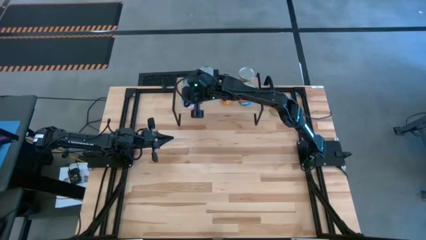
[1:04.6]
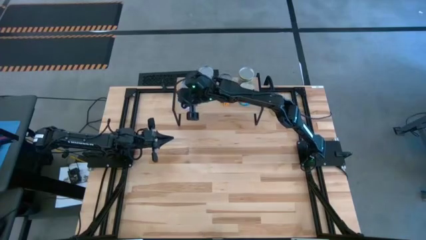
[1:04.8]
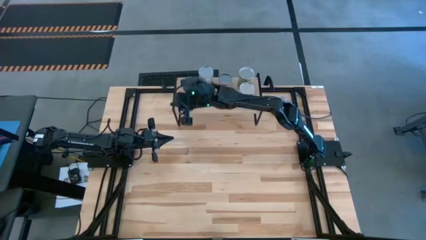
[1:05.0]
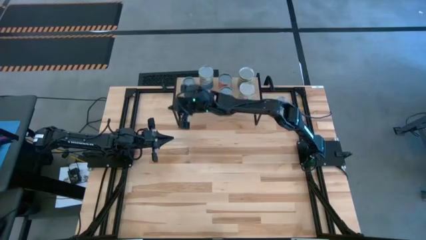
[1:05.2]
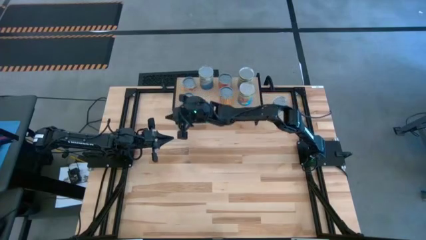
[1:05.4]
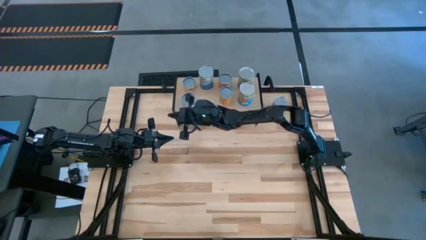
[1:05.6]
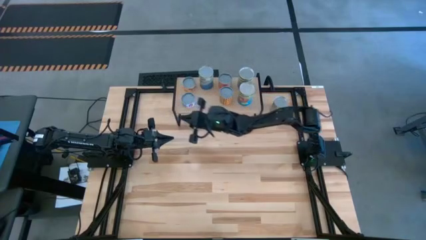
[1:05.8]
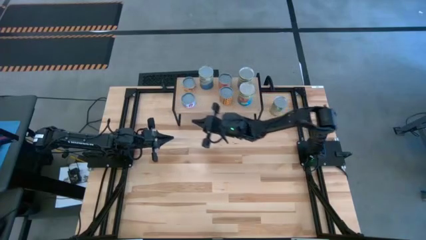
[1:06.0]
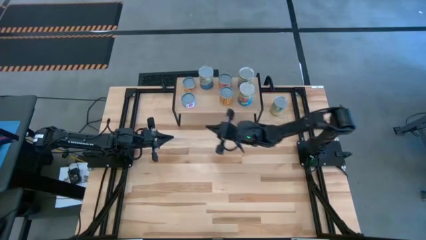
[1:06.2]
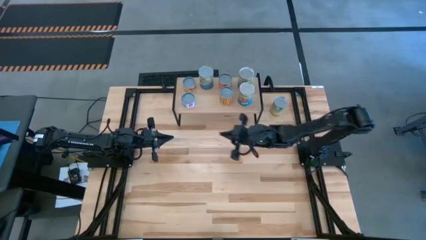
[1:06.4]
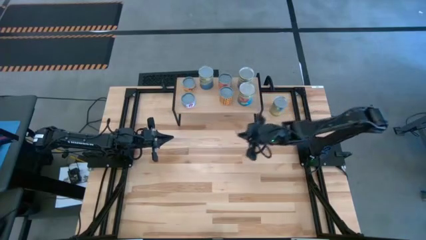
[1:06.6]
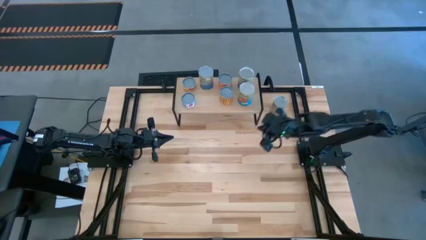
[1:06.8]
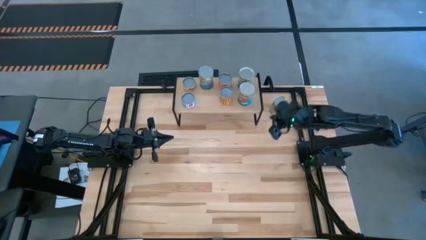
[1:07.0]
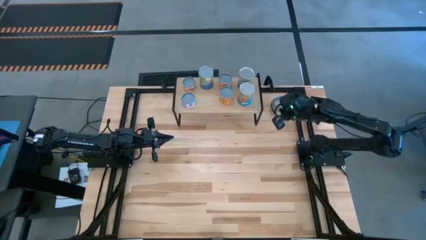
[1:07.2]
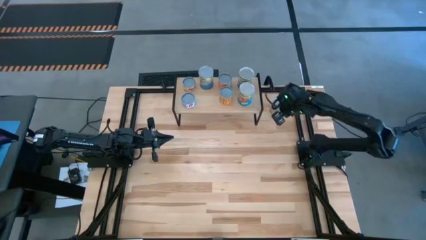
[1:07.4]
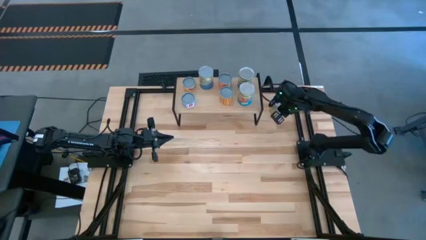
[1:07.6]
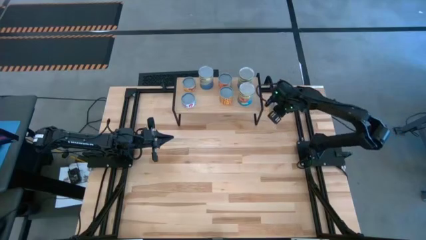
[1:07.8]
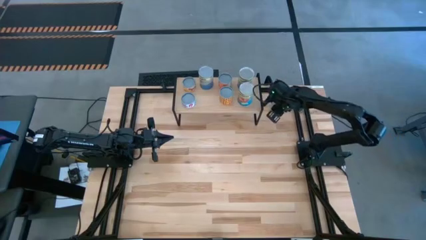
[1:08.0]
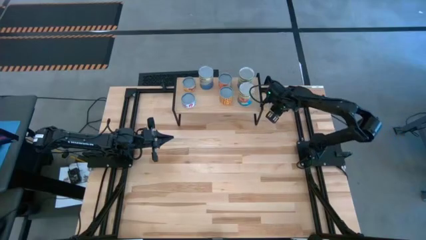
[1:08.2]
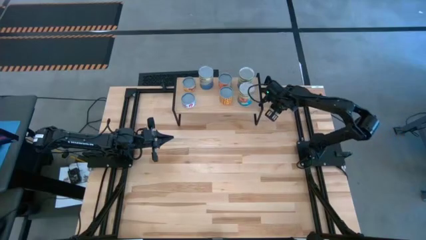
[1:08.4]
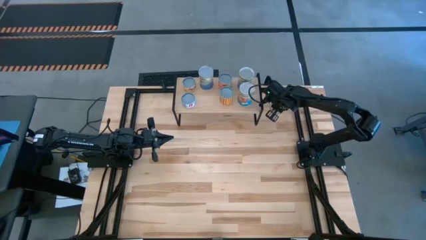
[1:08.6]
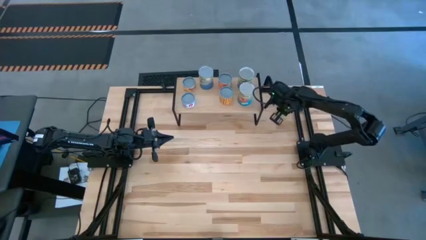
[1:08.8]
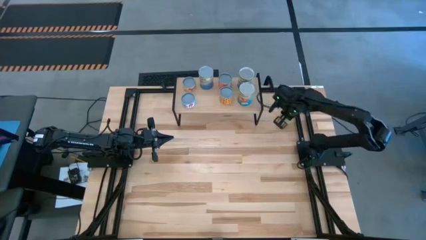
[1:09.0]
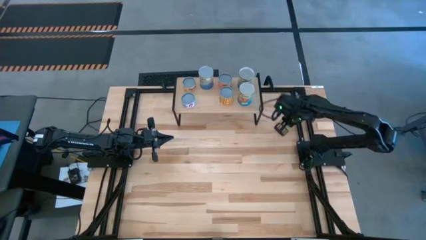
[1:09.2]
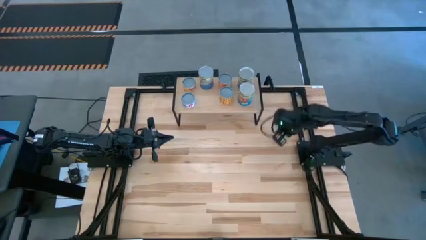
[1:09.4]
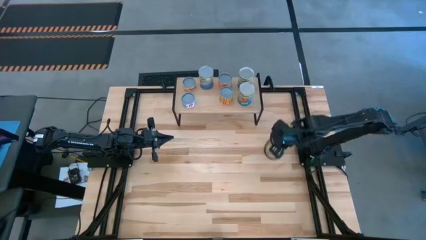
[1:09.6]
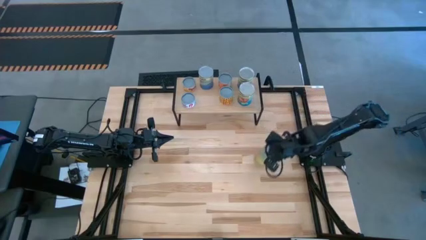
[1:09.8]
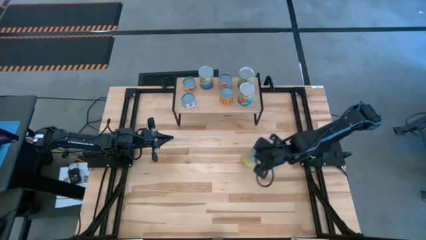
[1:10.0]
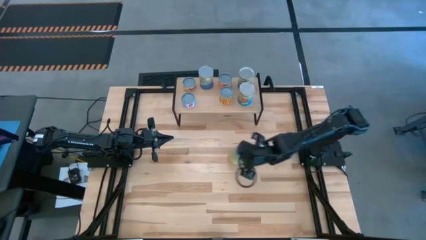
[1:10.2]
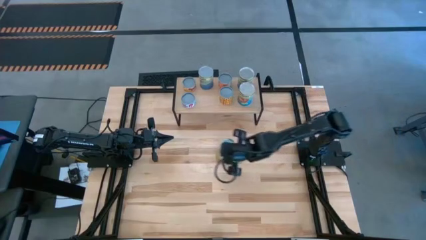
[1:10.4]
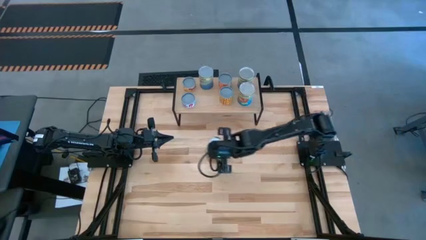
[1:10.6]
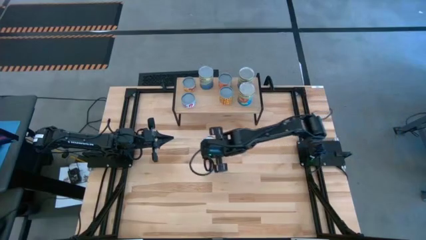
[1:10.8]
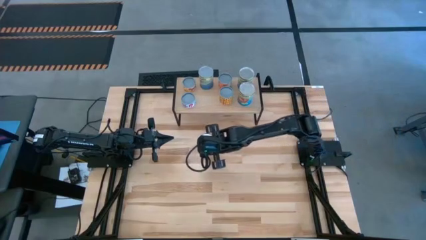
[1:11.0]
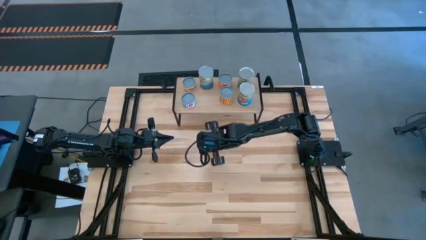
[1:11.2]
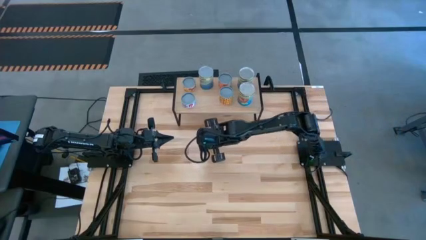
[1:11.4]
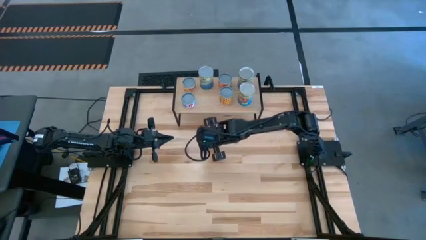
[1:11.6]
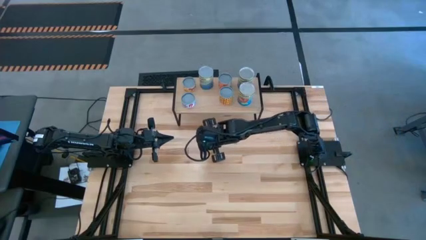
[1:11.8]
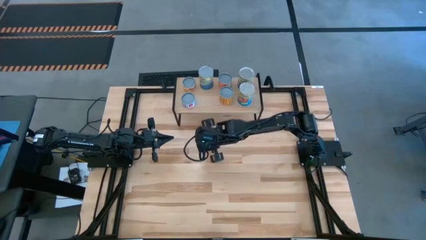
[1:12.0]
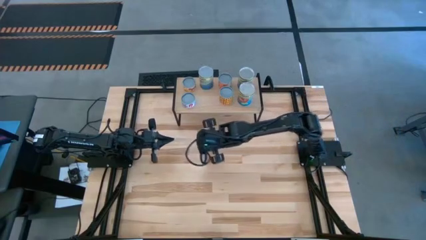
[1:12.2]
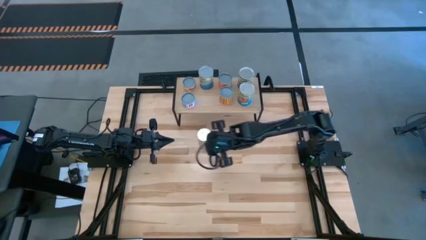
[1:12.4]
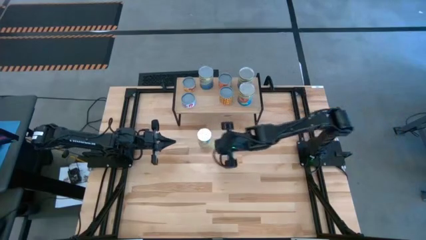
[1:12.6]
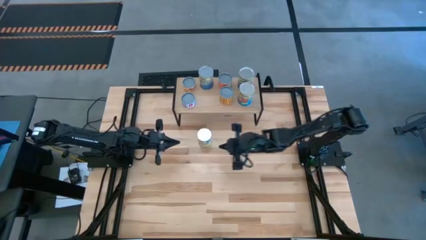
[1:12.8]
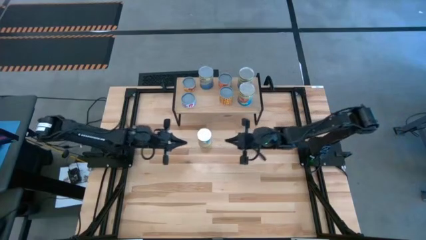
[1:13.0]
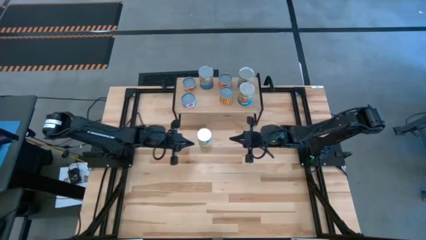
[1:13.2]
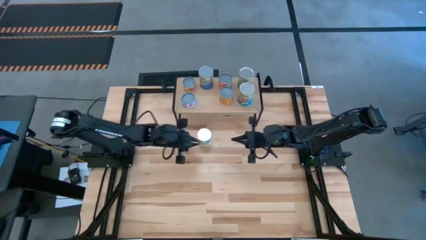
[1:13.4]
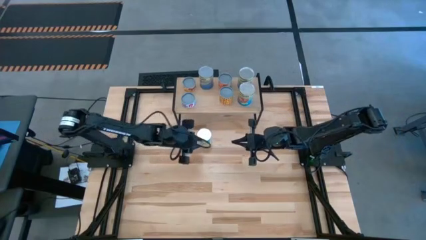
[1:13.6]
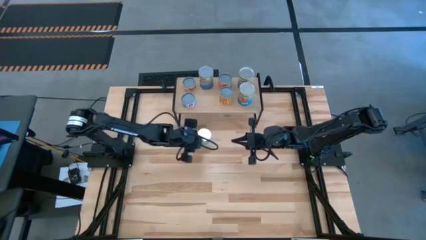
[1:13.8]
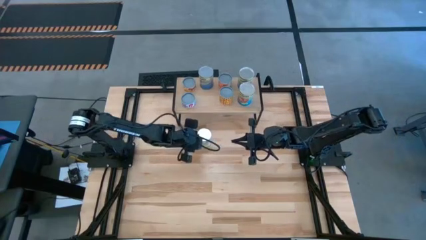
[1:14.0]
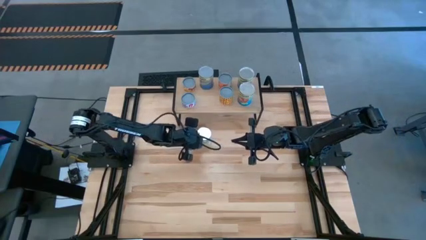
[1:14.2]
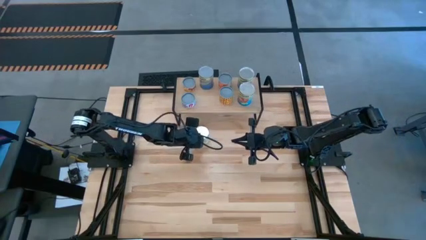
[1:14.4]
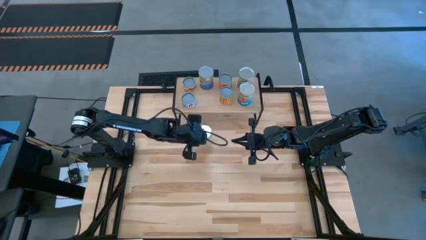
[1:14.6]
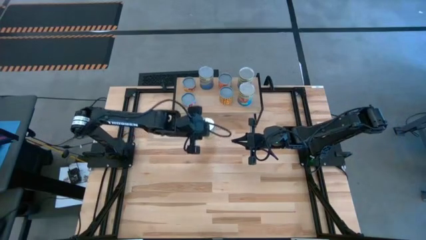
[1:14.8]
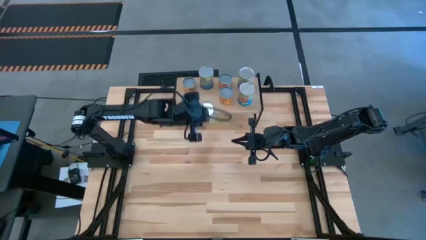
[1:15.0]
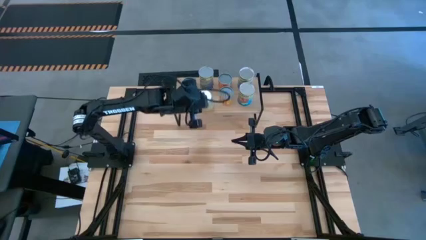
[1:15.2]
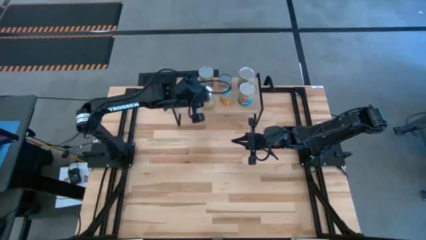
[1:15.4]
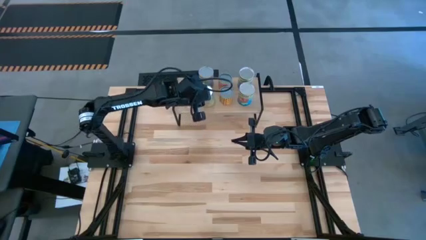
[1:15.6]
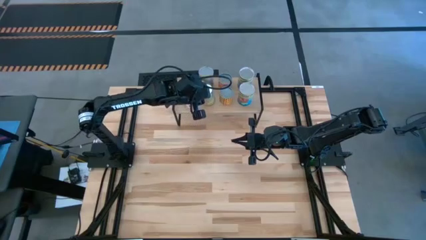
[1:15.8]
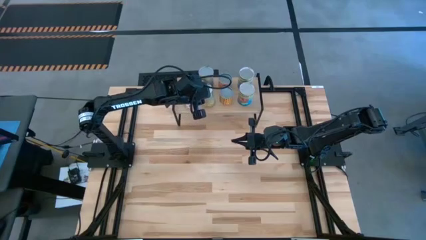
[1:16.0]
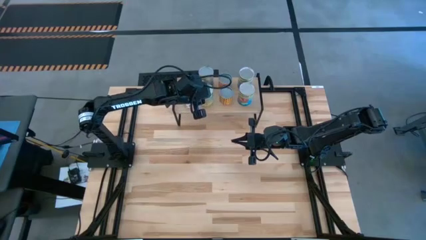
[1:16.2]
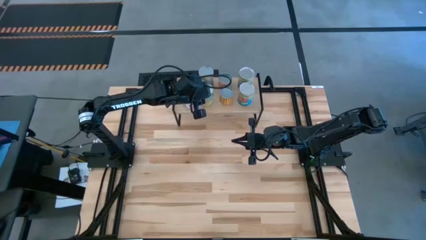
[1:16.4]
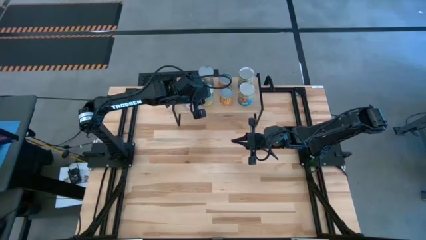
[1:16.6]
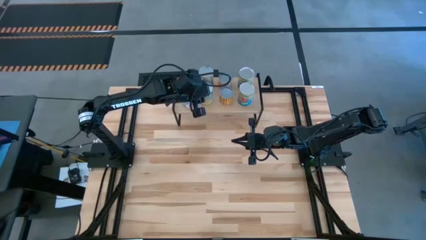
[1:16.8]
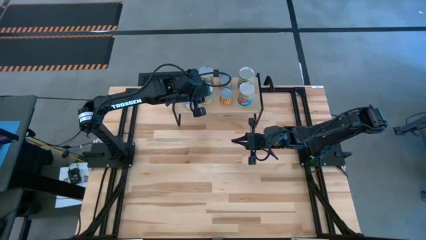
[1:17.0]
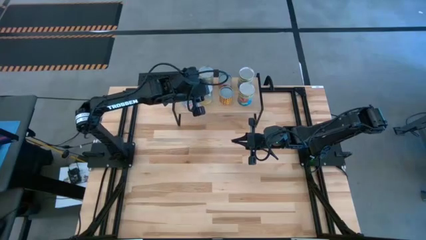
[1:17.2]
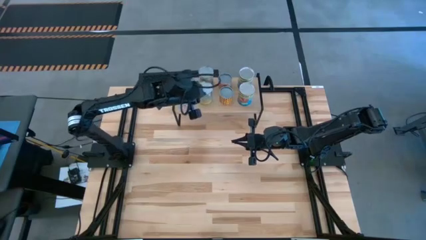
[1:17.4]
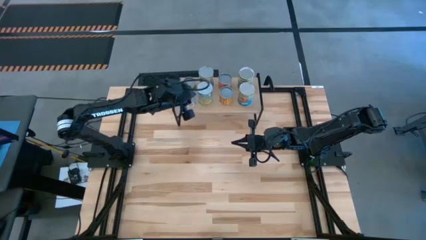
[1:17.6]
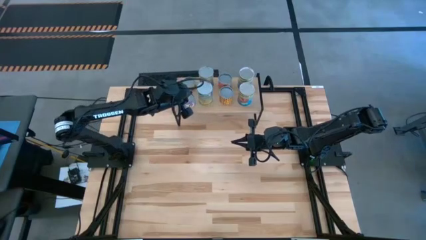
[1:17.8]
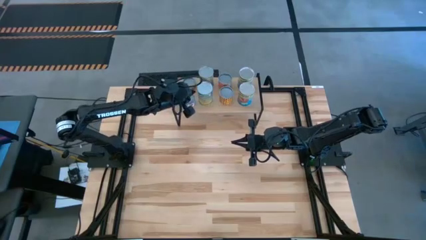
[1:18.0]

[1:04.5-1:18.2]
Task: Pick and place cans onto a shelf
Put the canned carrots on the shelf aligned with the canned peas
